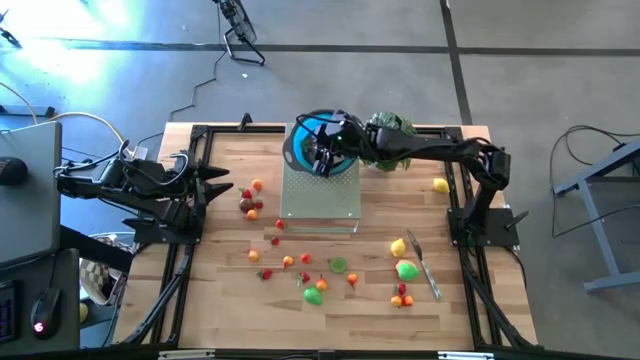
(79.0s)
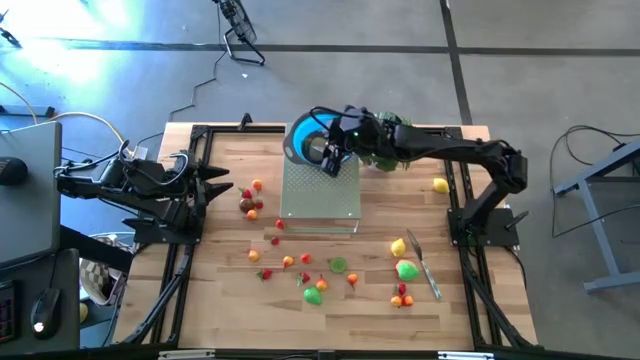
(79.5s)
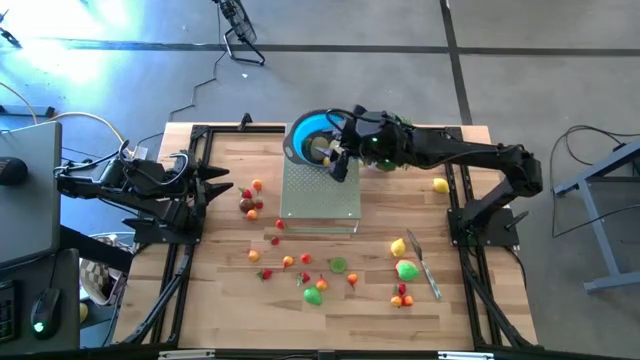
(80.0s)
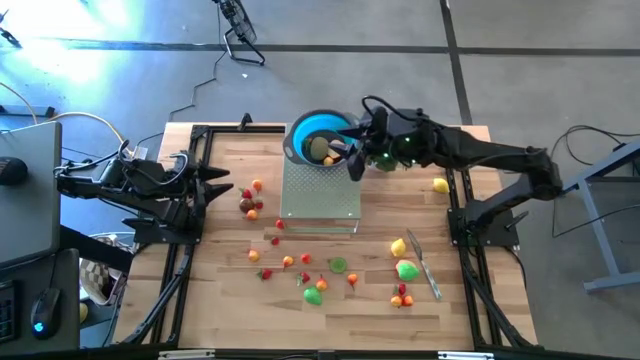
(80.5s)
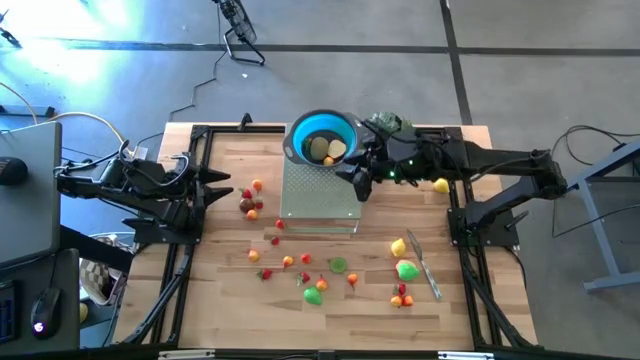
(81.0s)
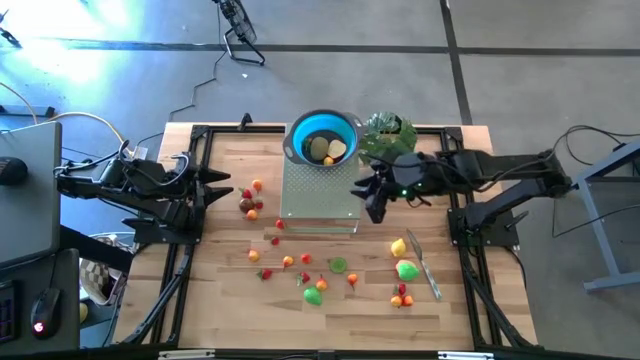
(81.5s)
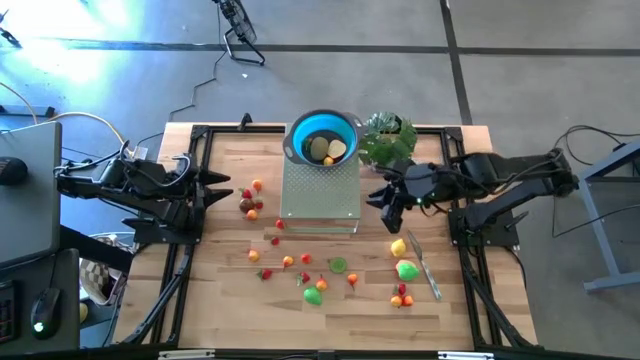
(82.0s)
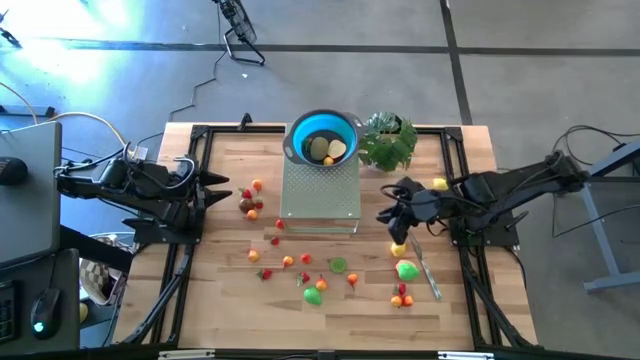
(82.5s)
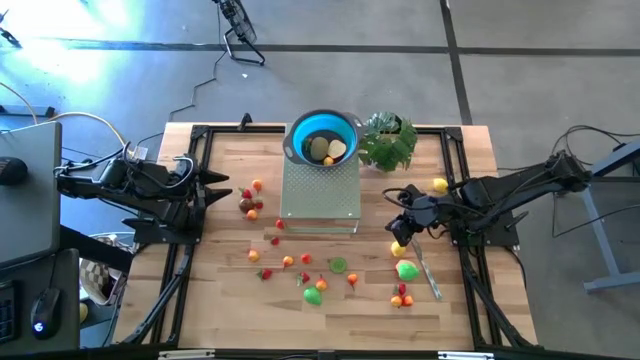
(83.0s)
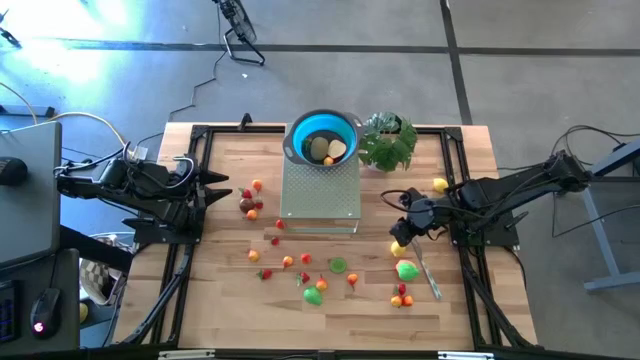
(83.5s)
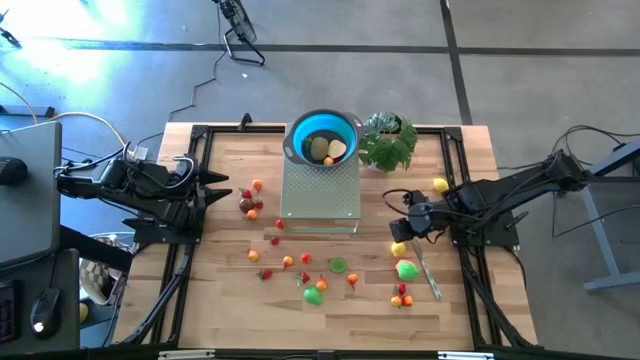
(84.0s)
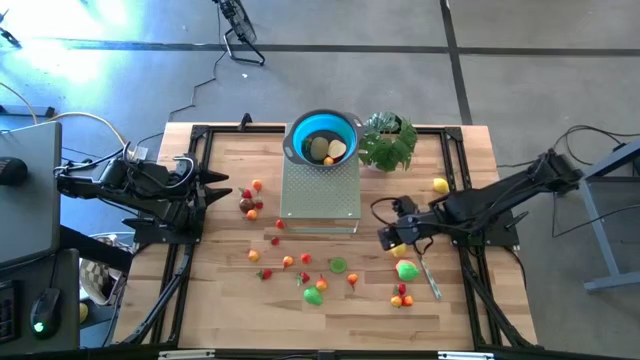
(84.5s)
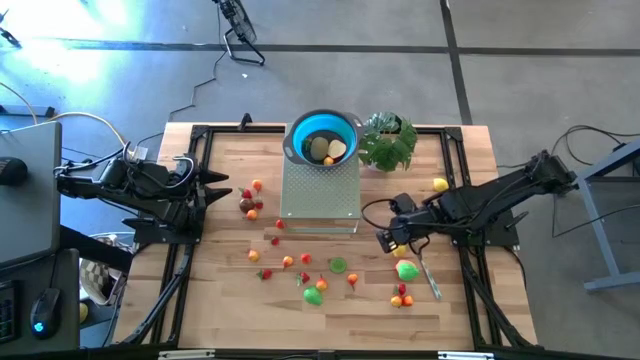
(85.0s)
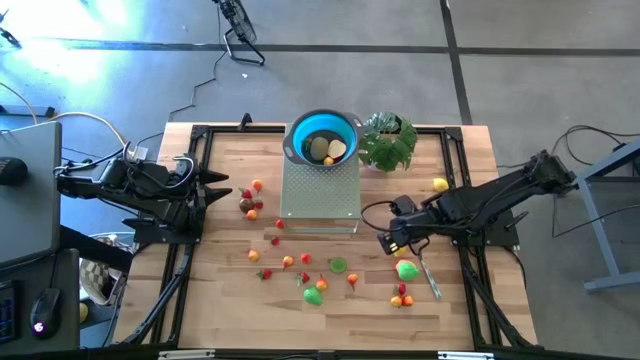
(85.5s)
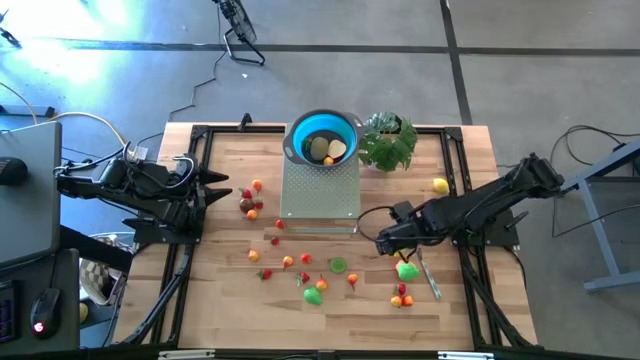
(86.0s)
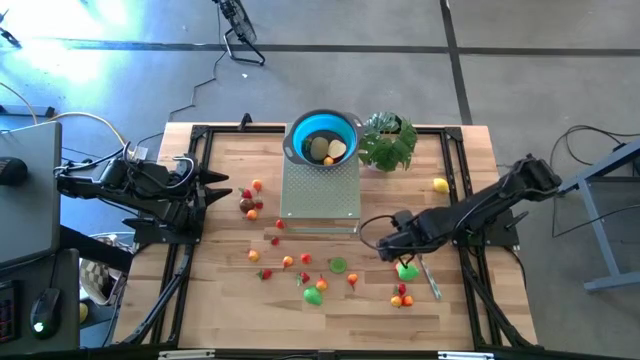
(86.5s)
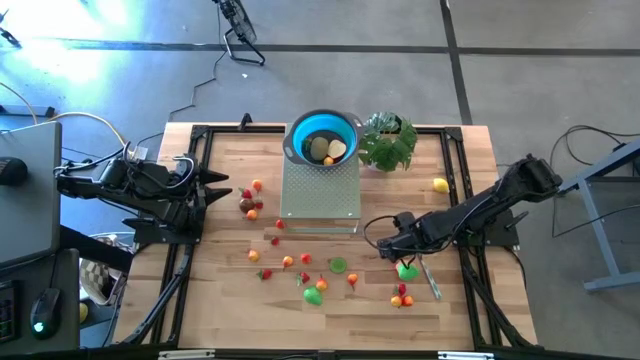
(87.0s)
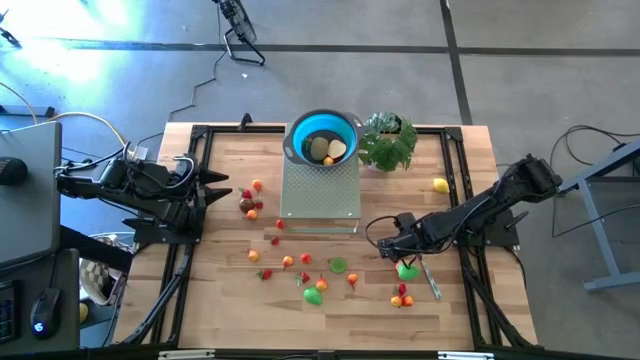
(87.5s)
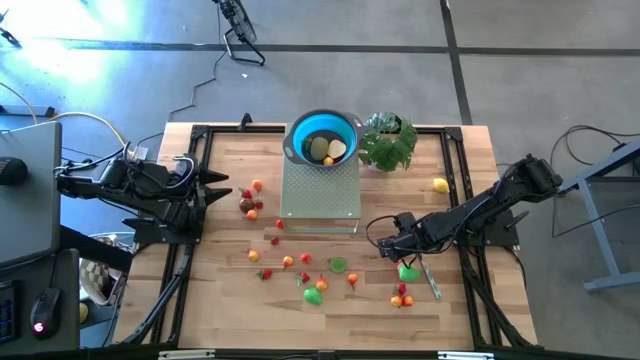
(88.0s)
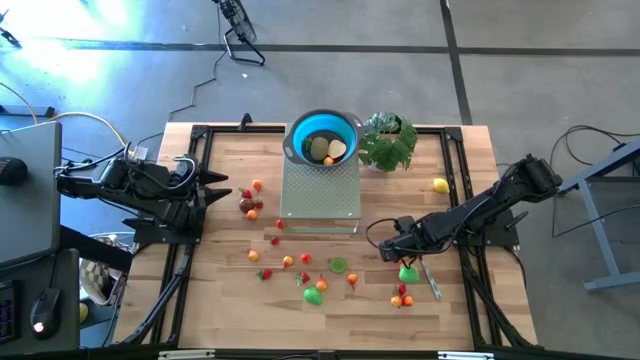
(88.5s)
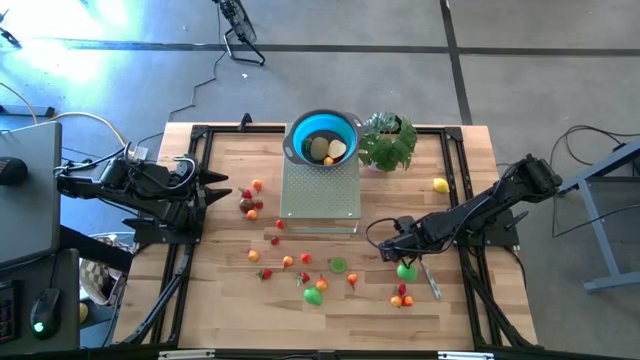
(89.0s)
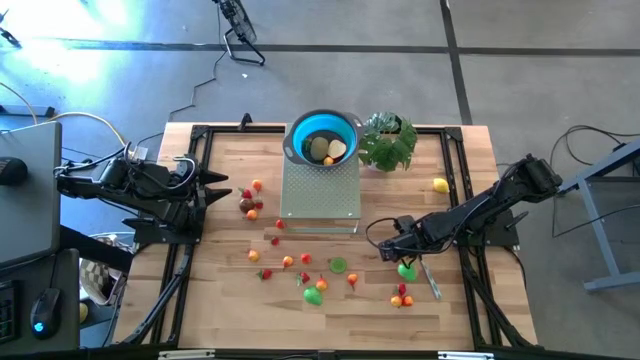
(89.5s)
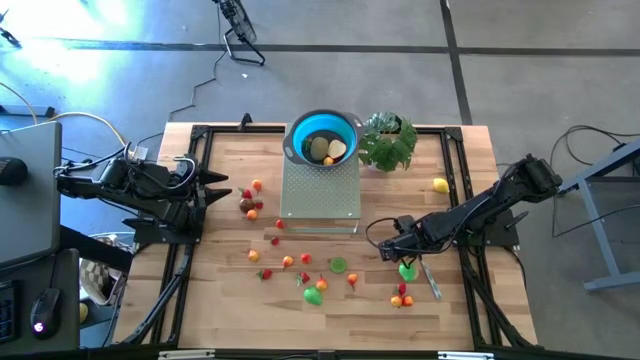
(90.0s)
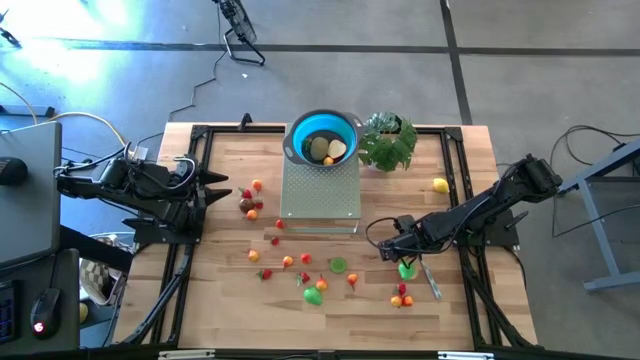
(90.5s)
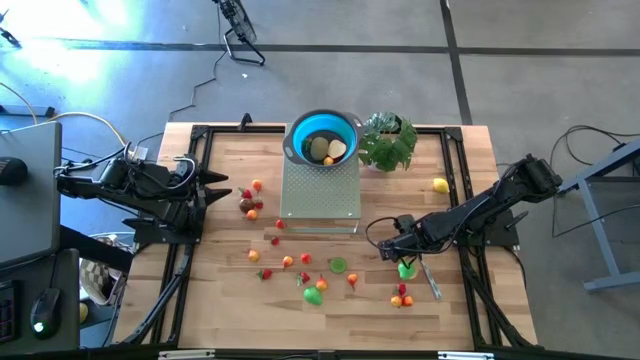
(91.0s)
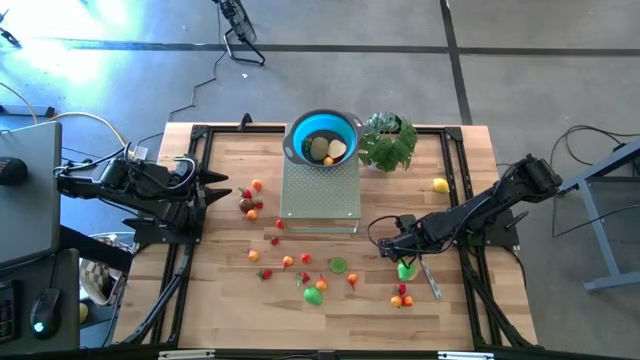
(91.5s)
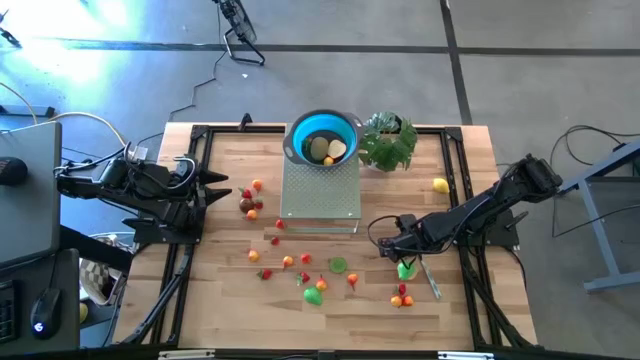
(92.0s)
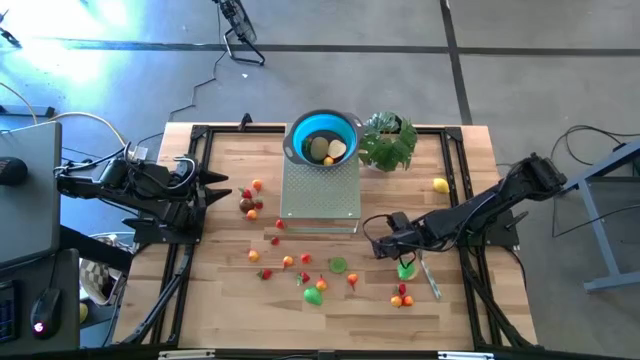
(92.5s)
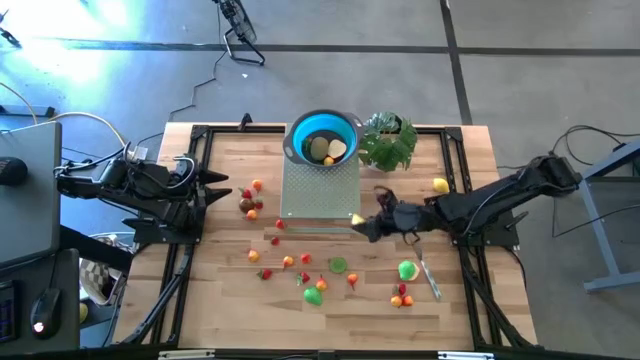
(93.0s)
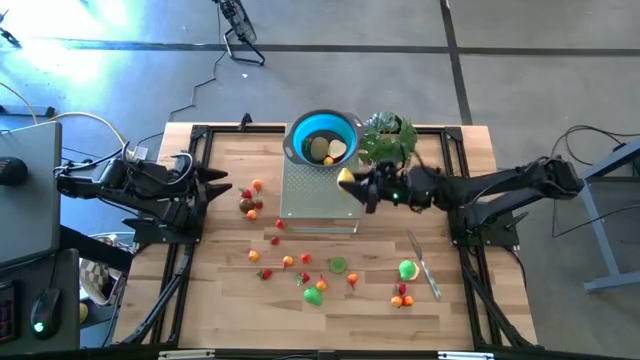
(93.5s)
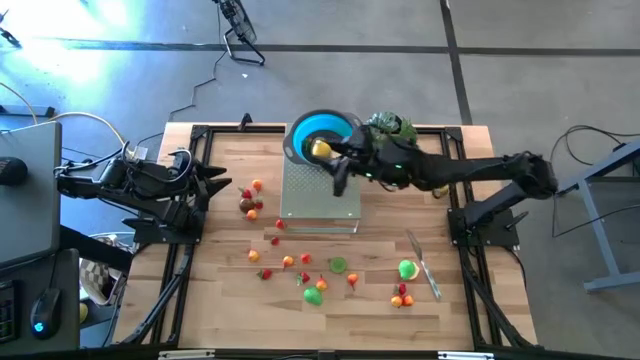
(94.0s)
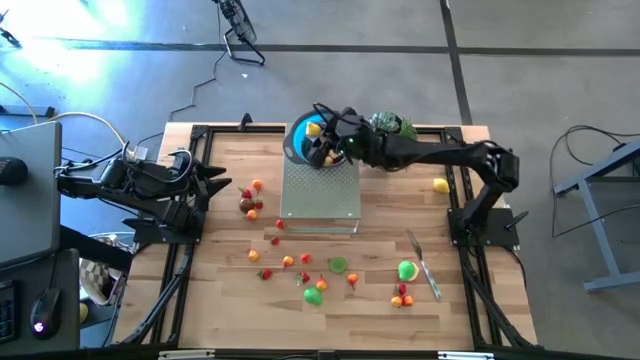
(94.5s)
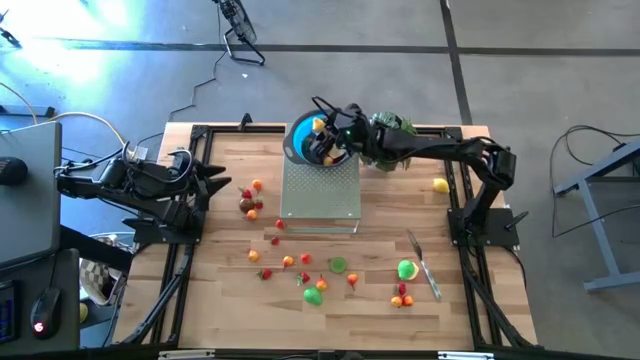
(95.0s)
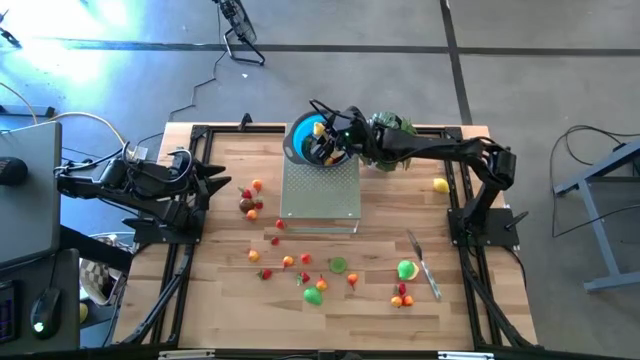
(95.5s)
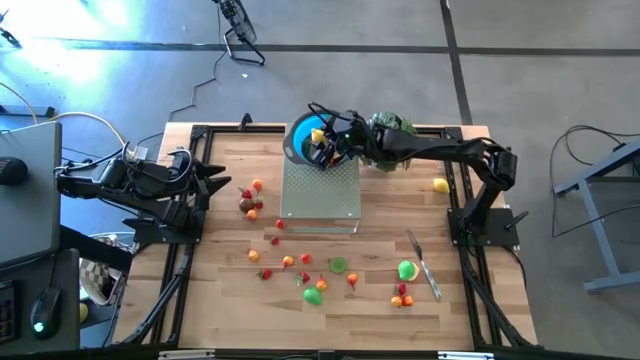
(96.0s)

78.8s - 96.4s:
Task: Pick & Place Fruit
Put the yellow lemon in the blue bowl on the shelf

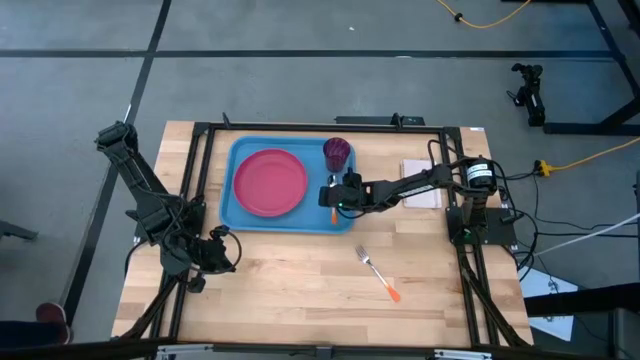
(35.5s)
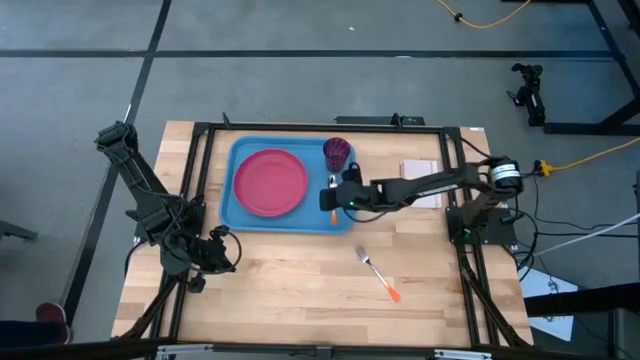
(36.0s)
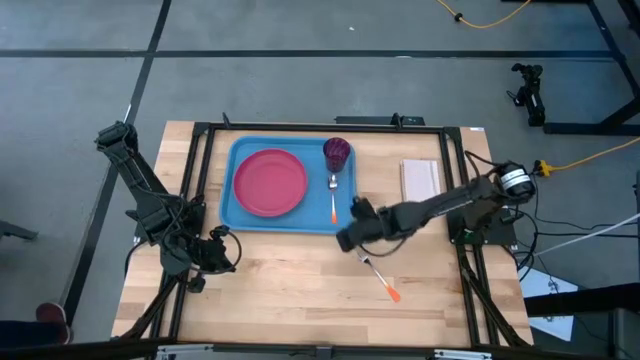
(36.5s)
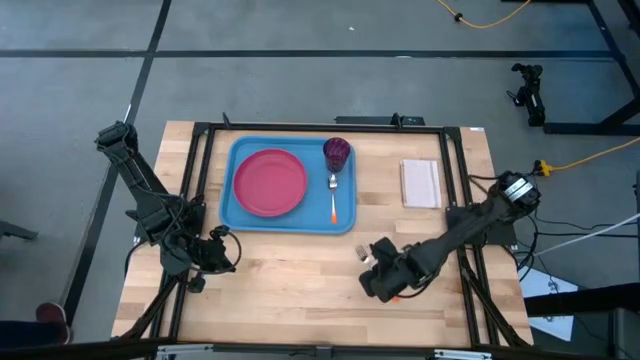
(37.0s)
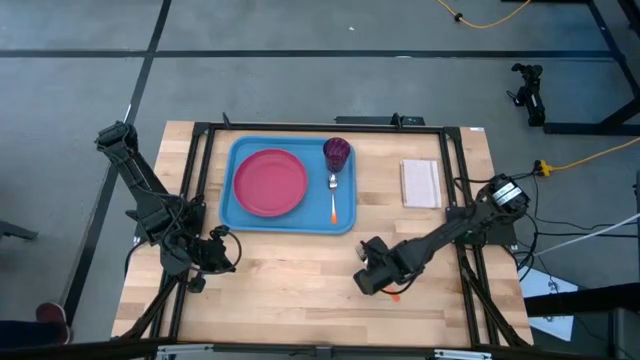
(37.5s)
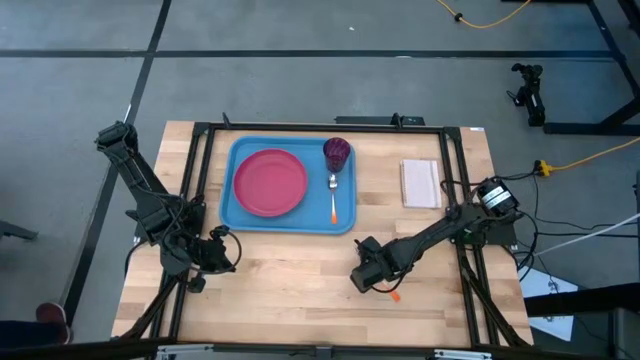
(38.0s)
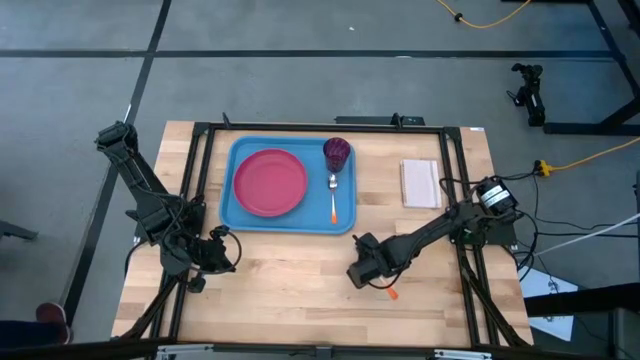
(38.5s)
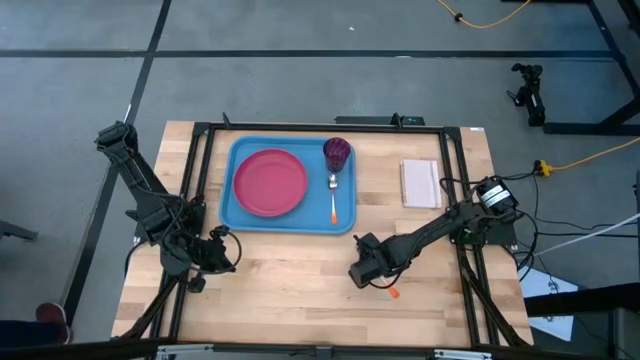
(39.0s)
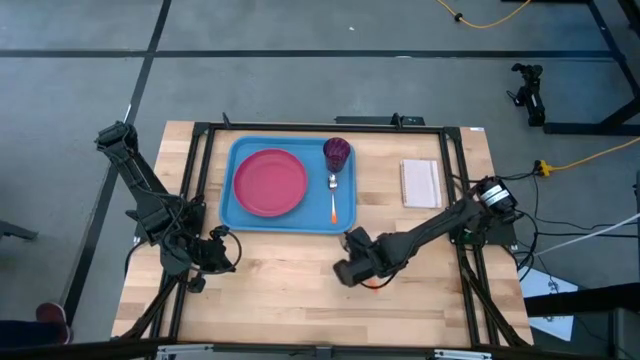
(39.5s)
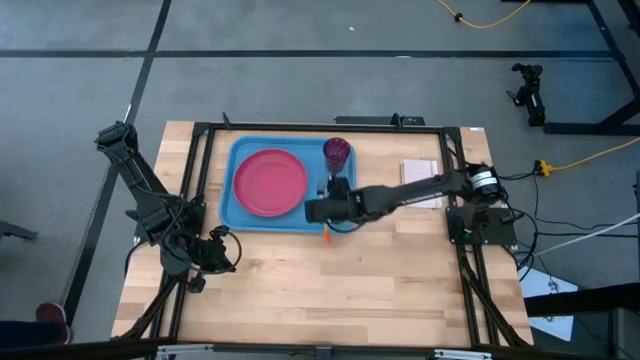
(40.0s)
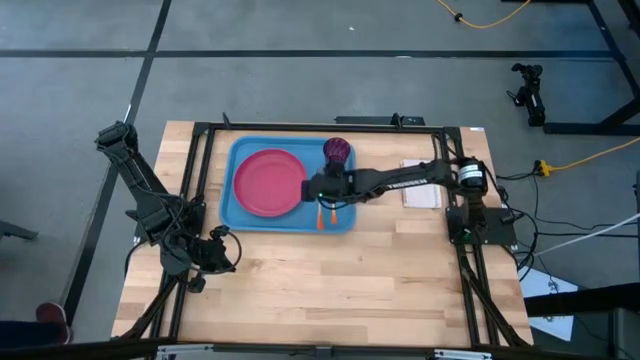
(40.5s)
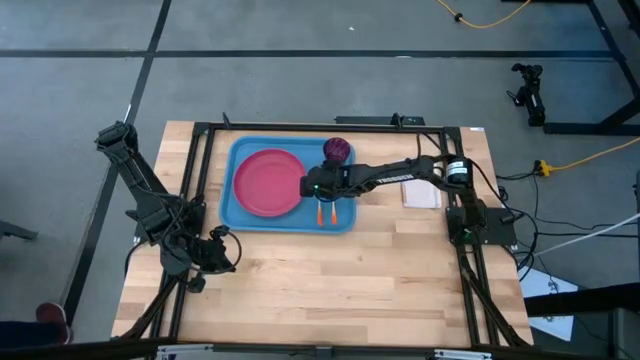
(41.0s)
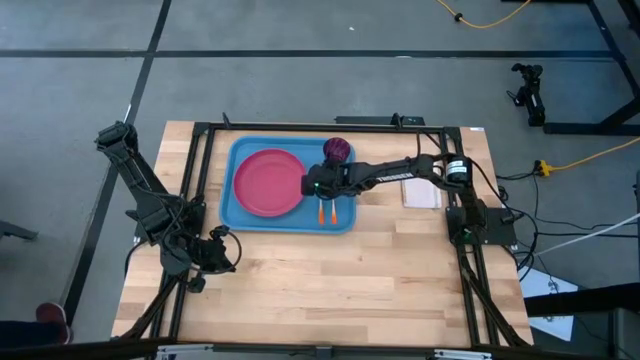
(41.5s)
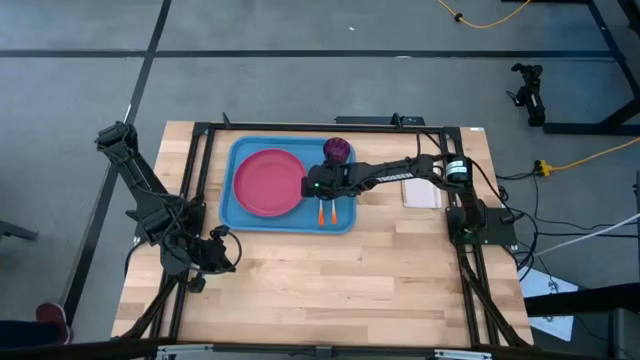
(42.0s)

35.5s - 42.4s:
Task: Pick and place plate/cup/fork/spoon on tray
Put the orange fork on the blue serving tray to the left side of the orange spoon
